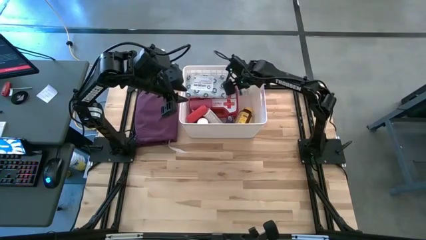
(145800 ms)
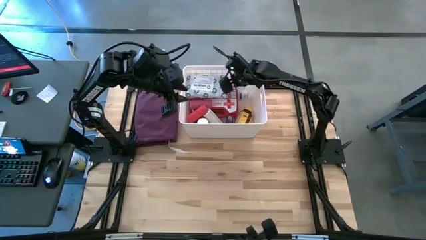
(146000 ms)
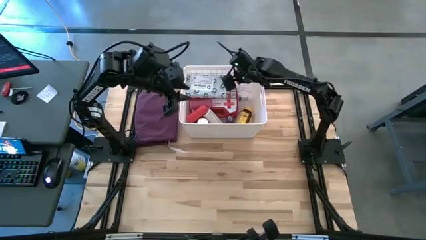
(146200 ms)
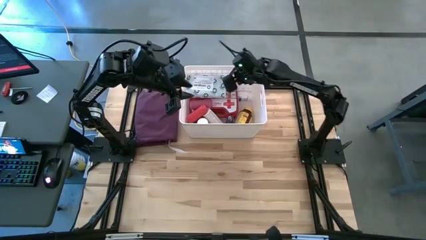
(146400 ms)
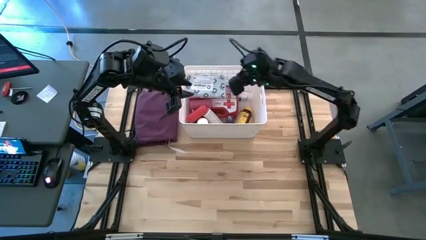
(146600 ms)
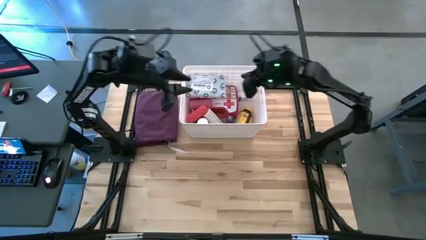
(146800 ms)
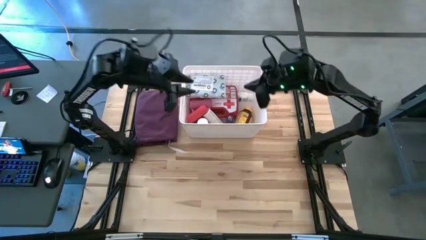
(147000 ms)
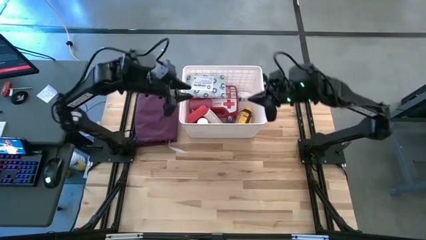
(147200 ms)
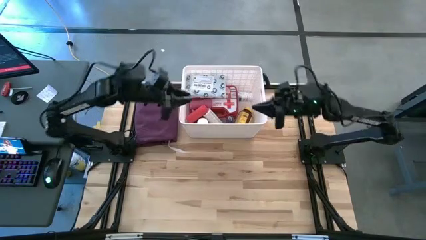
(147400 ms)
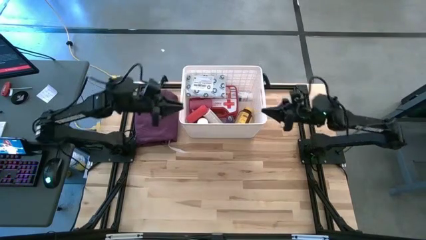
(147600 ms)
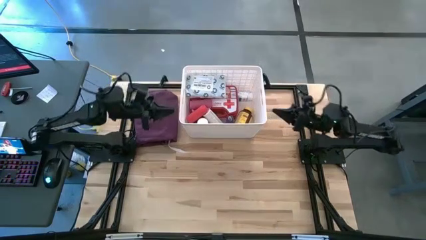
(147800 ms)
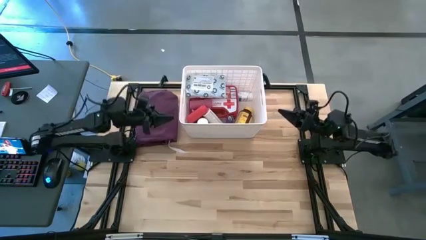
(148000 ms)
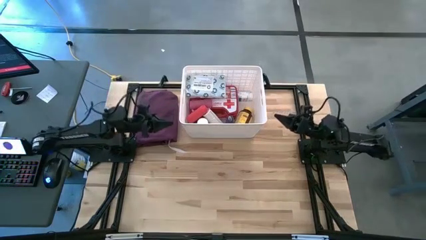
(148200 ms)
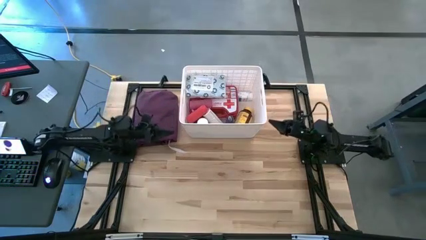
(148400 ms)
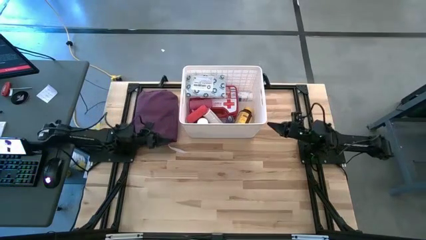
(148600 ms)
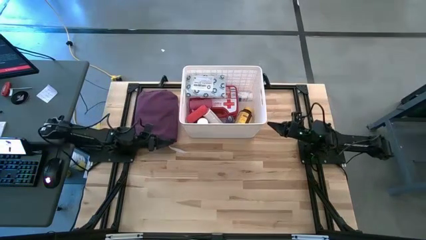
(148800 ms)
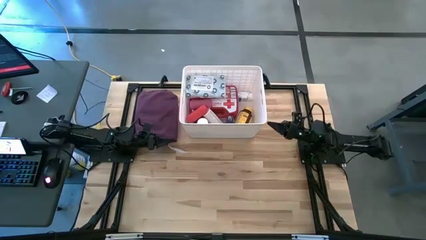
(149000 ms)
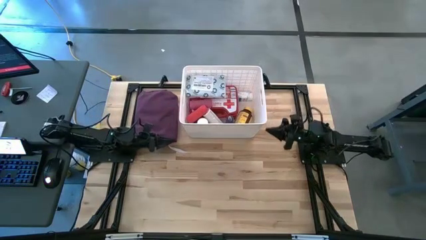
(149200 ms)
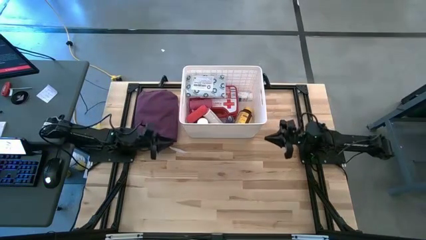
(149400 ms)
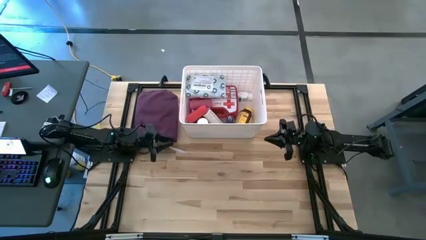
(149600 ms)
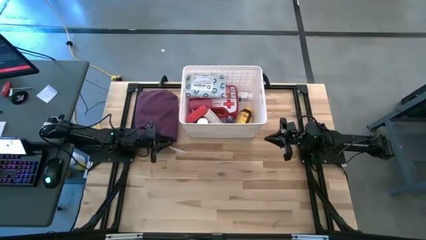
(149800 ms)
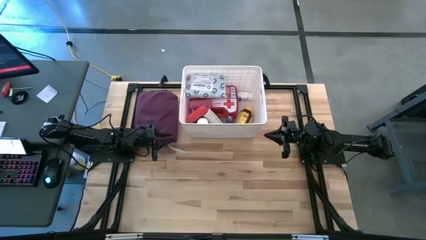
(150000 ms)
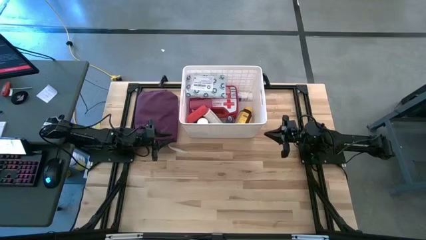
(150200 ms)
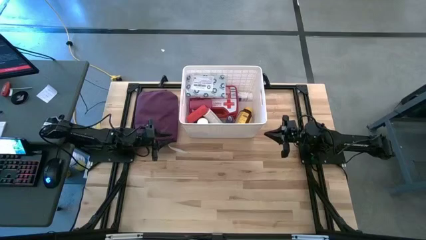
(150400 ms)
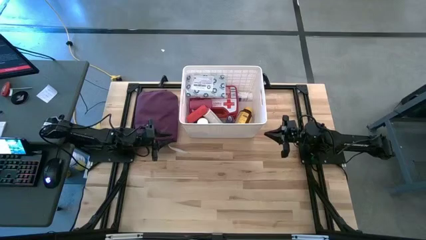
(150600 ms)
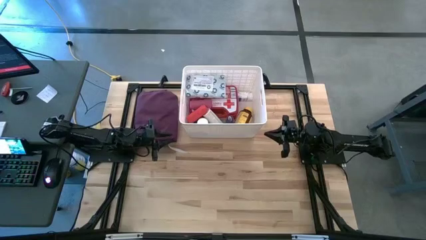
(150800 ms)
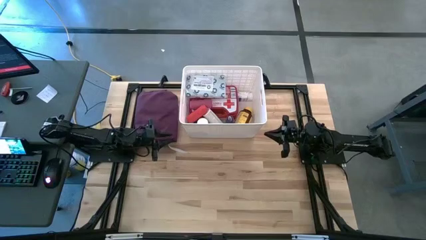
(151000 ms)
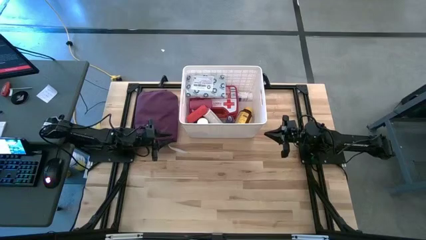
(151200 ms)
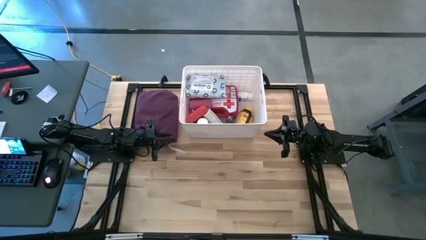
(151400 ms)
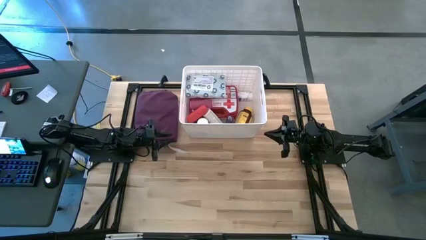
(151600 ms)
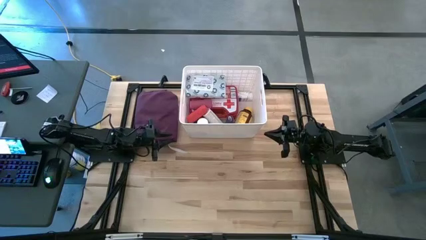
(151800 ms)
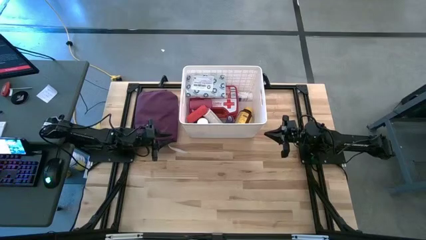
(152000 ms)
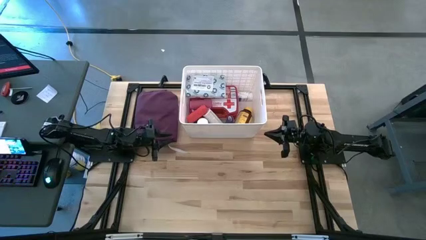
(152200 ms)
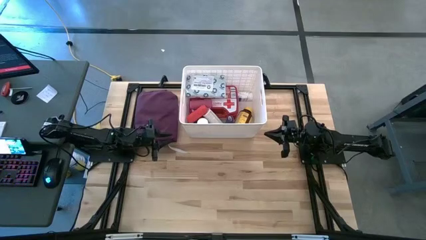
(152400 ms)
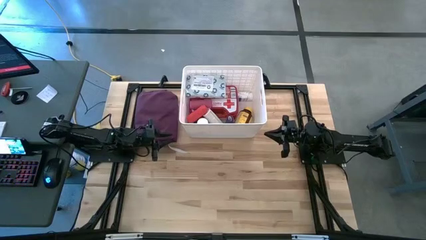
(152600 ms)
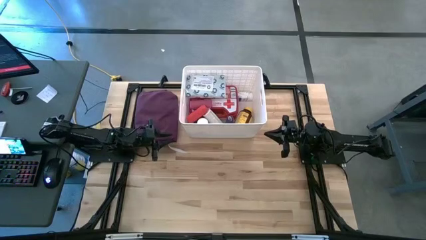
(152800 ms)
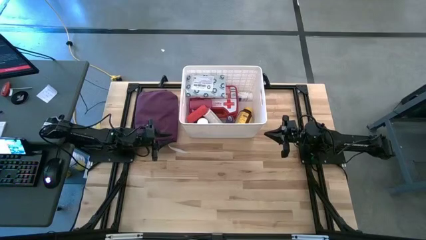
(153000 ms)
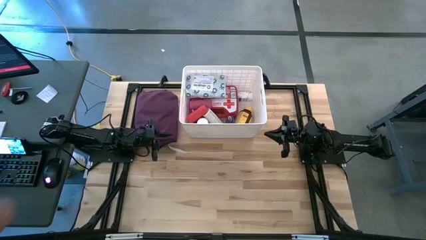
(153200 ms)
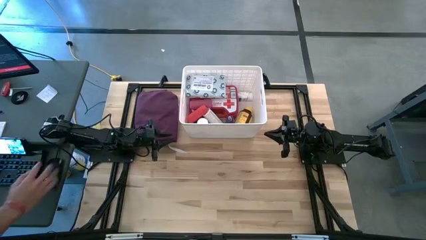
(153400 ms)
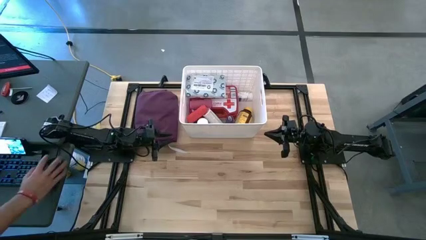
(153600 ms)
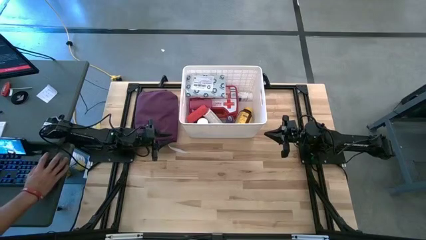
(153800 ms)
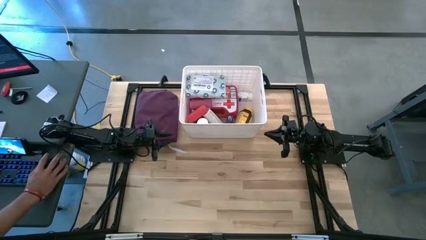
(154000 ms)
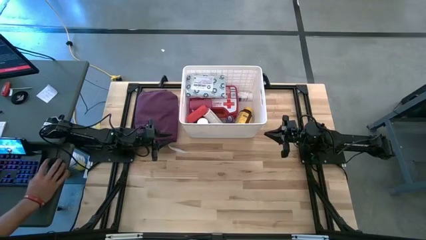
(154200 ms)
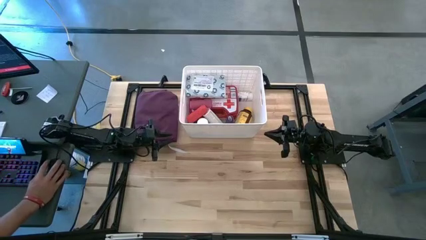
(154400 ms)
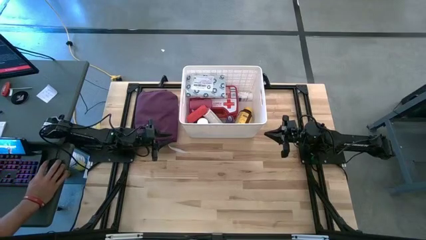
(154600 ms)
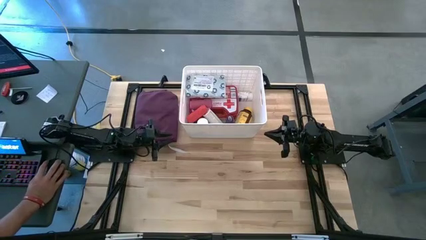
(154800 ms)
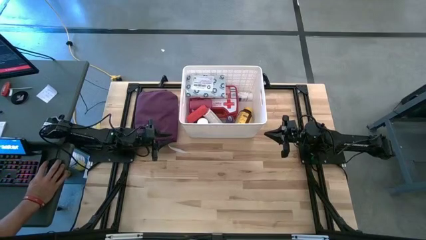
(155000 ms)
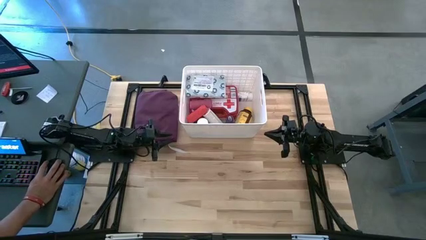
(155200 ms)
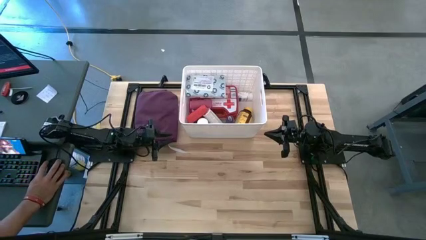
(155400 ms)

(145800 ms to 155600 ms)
Task: Pick & place medical supplies in basket/bin
Return to Home Position

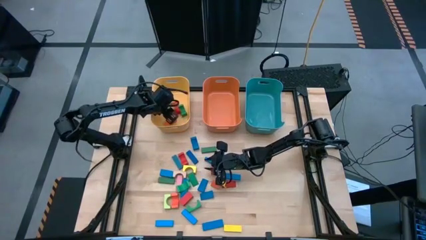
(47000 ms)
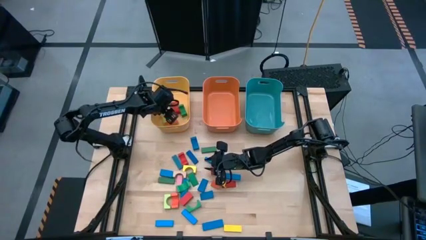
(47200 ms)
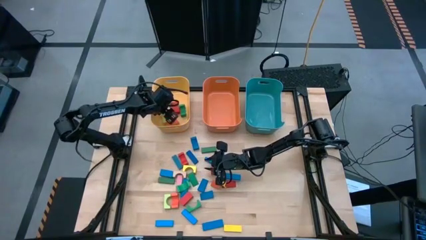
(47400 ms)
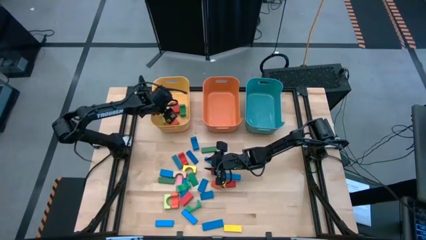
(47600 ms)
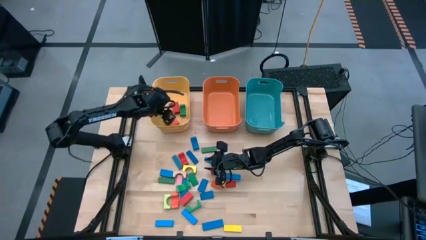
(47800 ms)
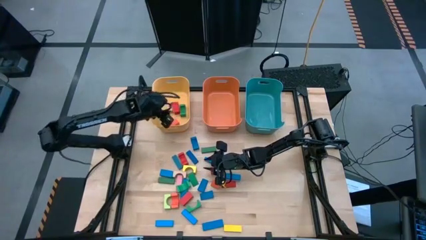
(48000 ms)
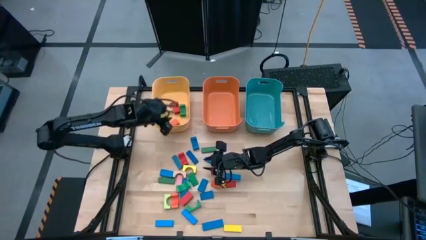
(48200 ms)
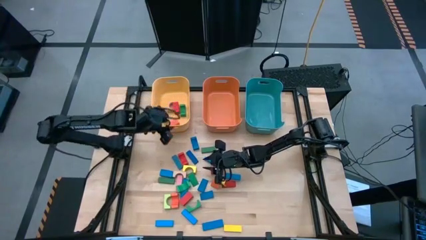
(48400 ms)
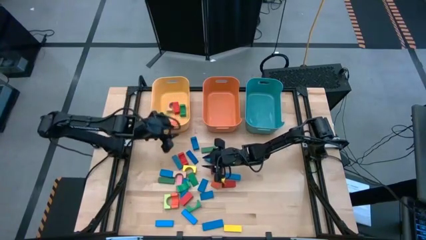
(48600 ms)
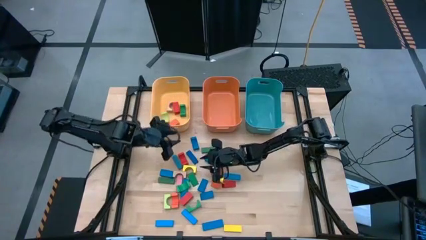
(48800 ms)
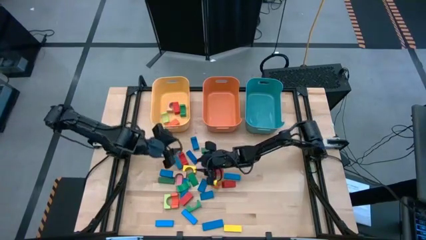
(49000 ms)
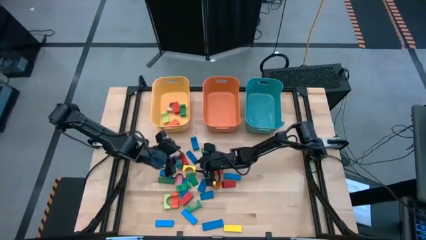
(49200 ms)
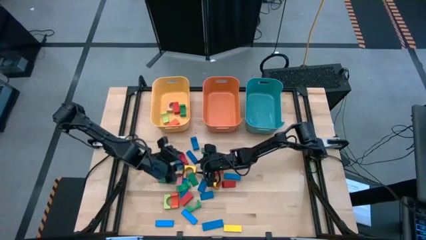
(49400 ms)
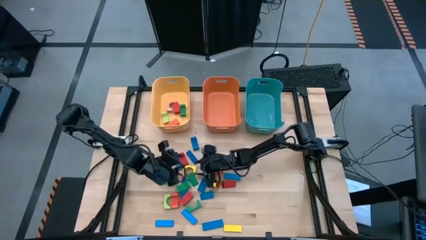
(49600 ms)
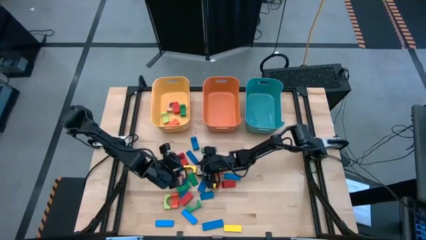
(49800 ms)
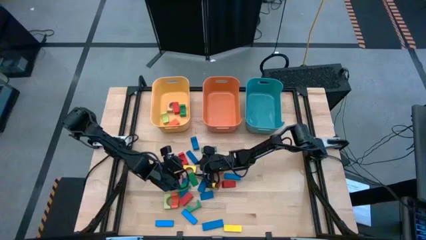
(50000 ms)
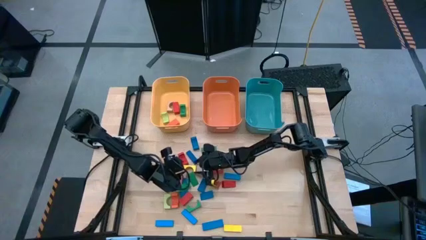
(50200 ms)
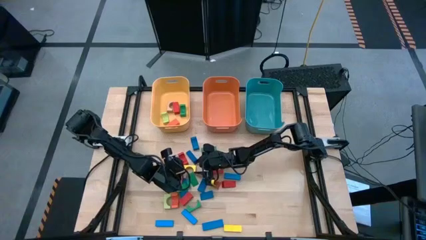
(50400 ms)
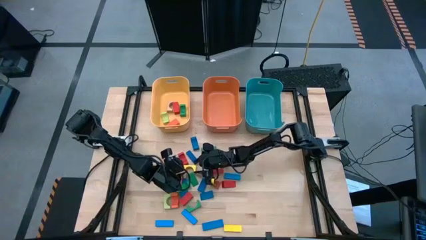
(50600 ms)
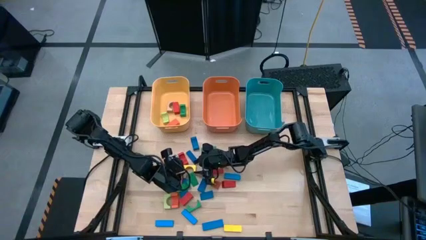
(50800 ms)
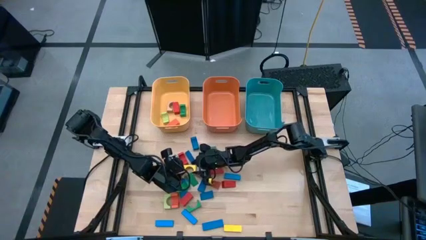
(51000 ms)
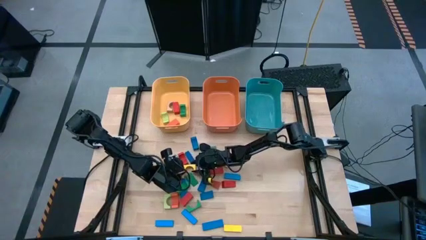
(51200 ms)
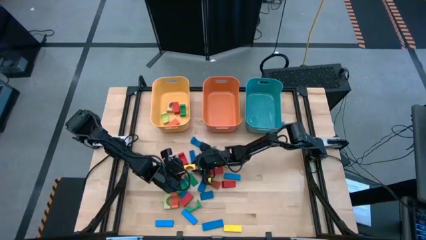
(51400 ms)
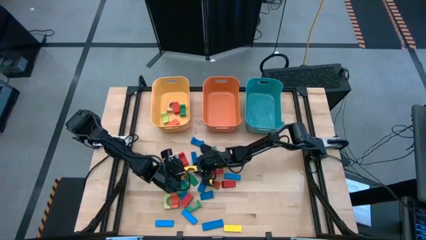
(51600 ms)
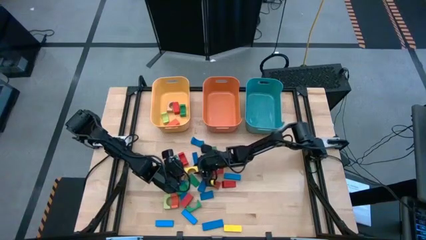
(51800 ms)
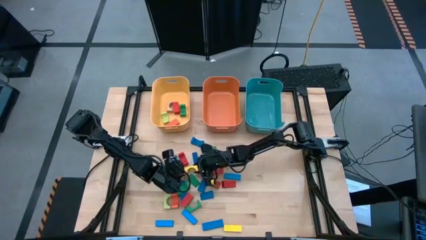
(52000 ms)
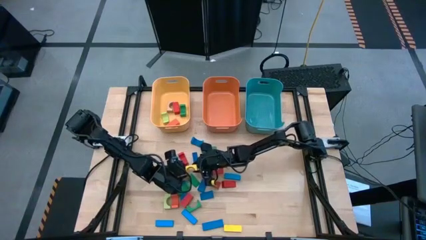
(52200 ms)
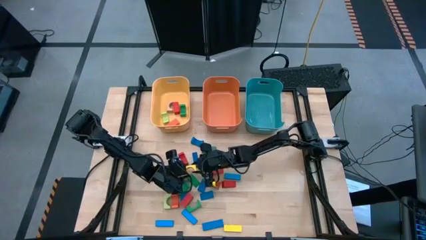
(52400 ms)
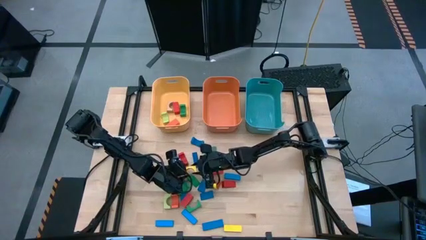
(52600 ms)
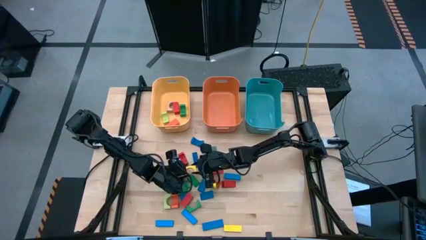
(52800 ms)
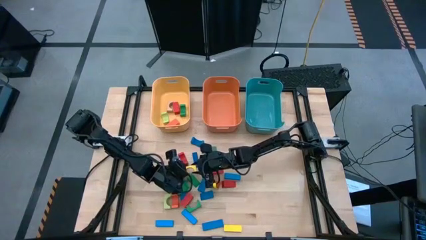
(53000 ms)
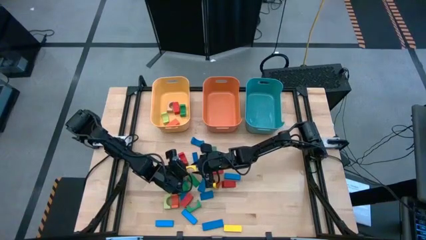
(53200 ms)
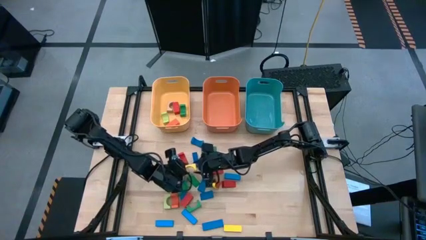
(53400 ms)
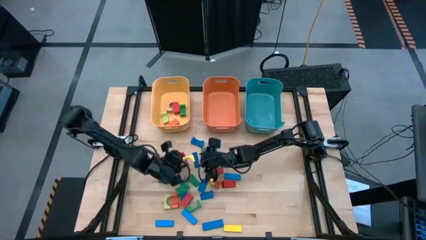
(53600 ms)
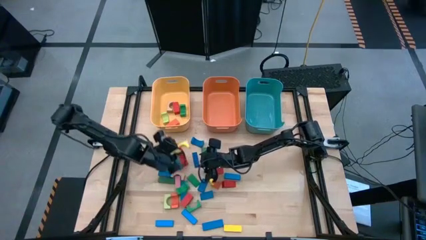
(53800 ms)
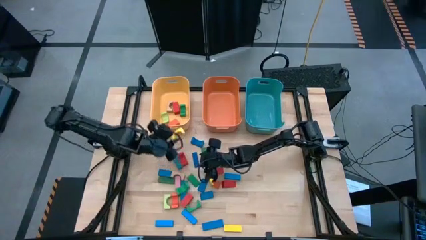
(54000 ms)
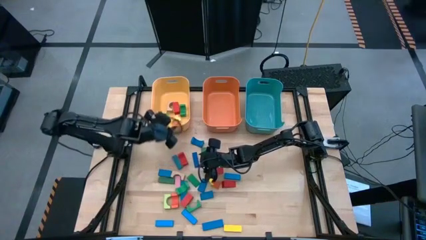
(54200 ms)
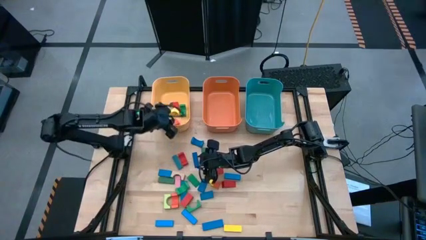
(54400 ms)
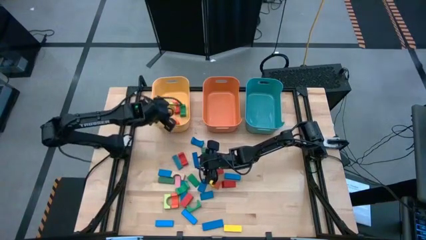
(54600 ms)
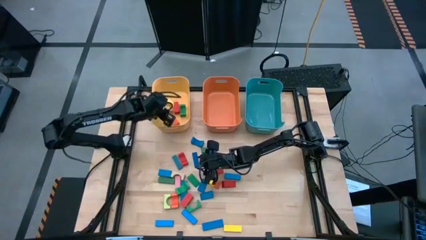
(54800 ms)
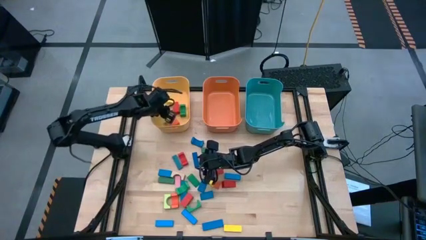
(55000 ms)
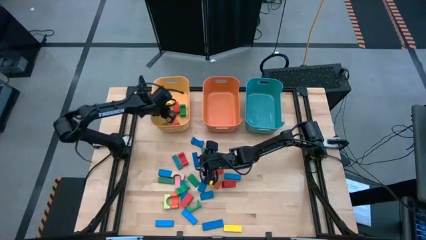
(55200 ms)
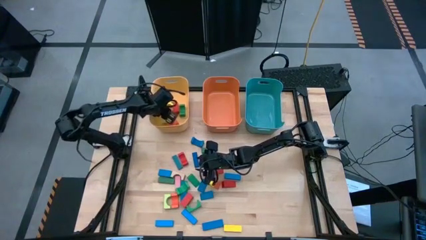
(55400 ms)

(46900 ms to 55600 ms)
Task: Sort blocks by size
Put the yellow arch block into the yellow bin
